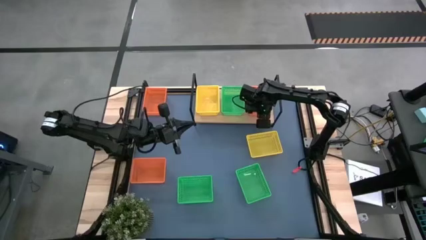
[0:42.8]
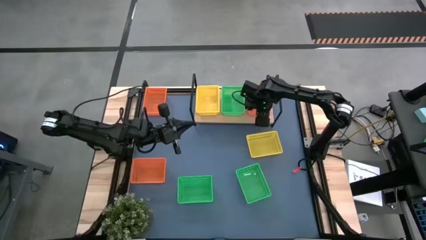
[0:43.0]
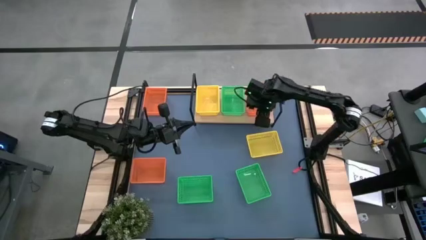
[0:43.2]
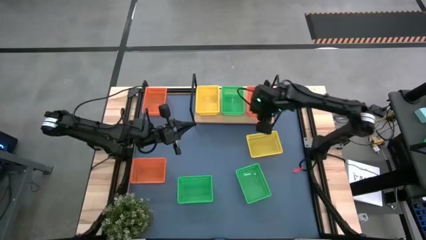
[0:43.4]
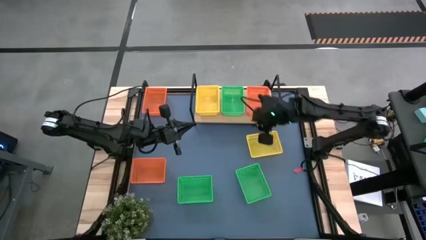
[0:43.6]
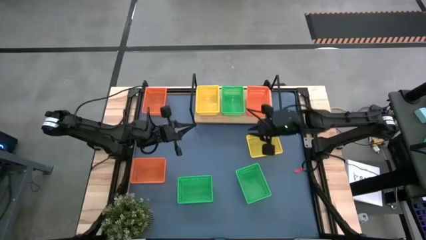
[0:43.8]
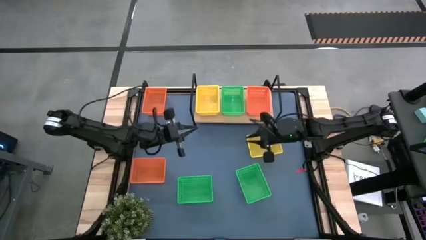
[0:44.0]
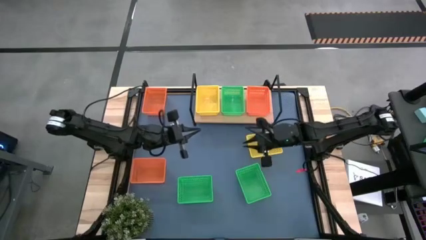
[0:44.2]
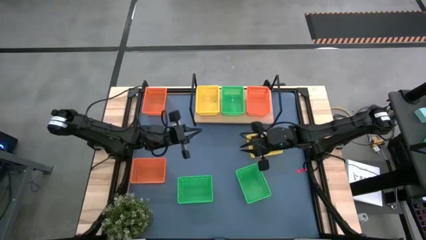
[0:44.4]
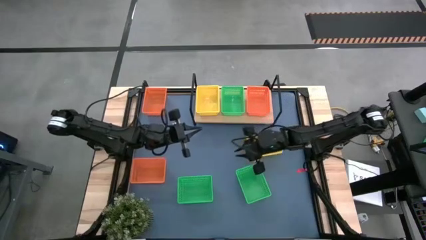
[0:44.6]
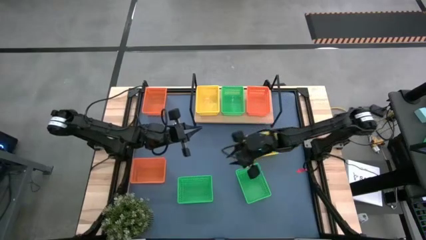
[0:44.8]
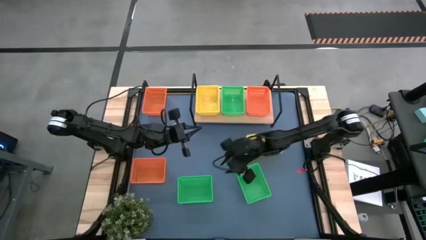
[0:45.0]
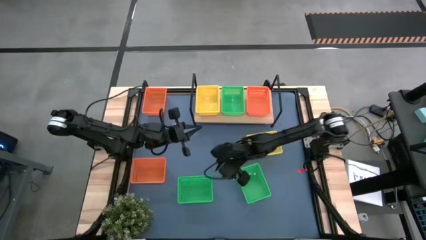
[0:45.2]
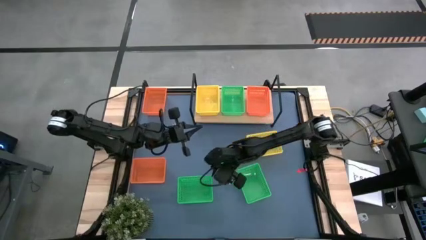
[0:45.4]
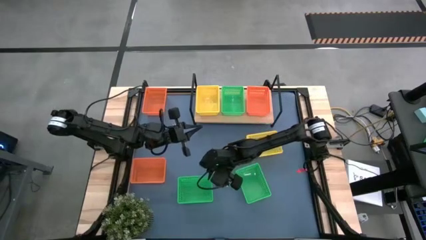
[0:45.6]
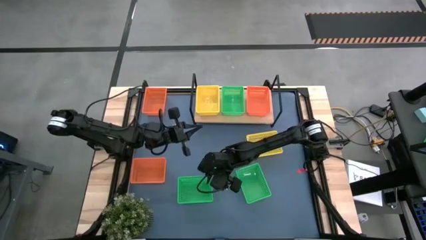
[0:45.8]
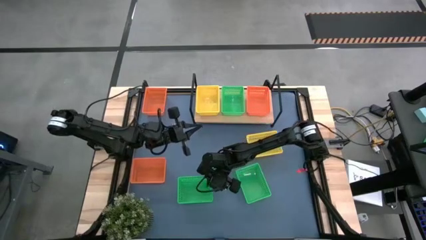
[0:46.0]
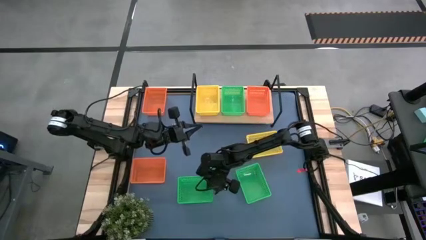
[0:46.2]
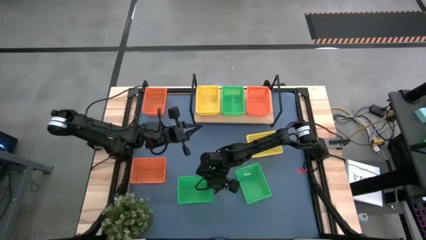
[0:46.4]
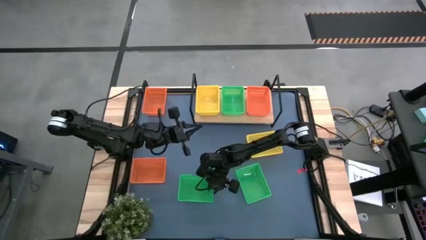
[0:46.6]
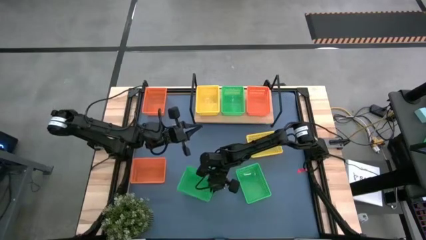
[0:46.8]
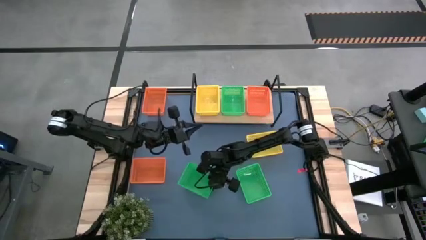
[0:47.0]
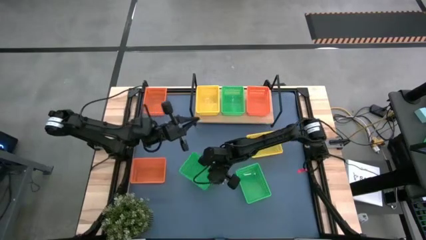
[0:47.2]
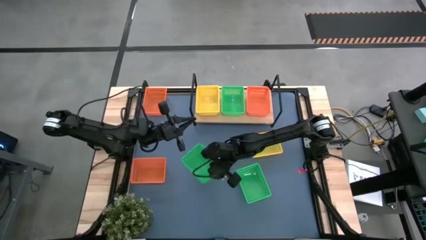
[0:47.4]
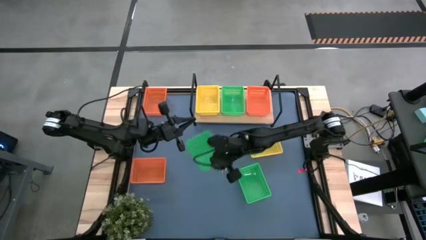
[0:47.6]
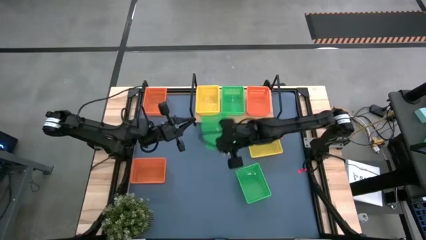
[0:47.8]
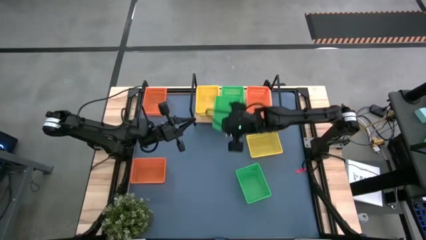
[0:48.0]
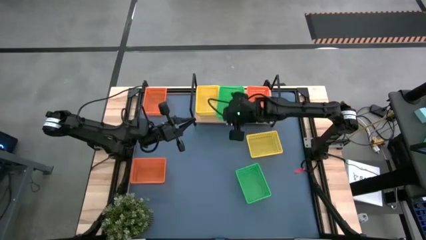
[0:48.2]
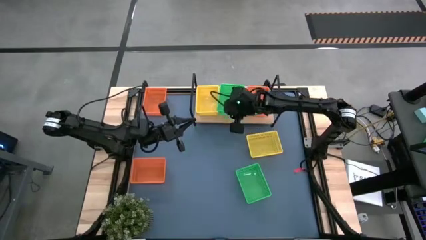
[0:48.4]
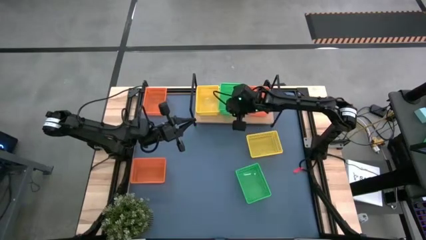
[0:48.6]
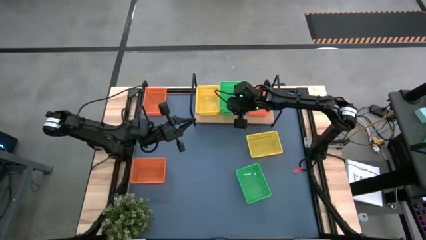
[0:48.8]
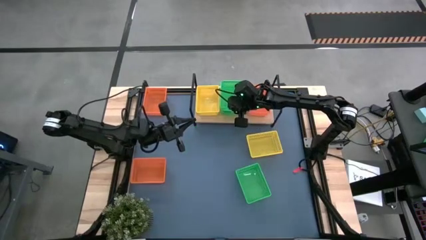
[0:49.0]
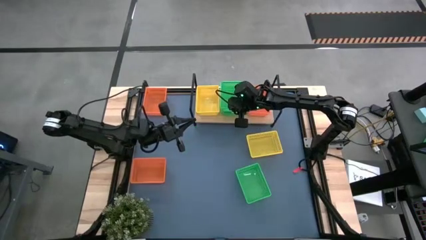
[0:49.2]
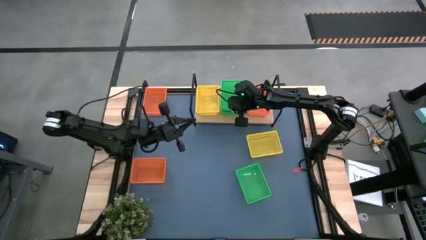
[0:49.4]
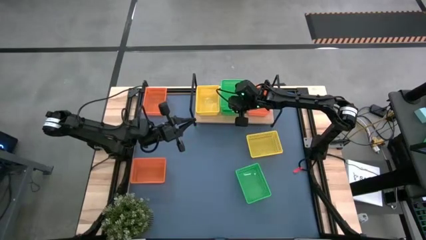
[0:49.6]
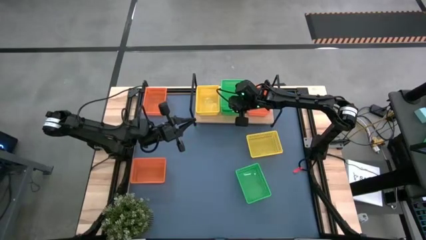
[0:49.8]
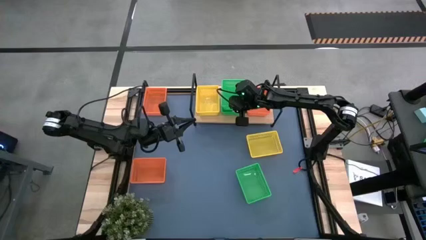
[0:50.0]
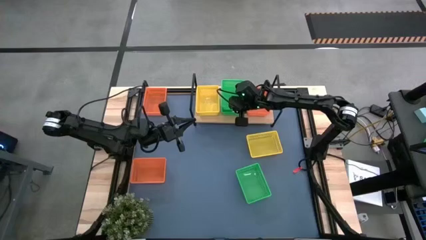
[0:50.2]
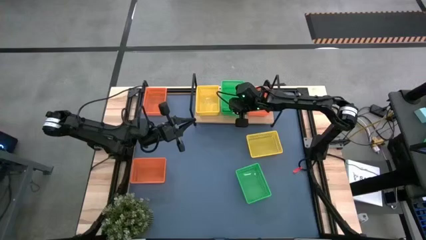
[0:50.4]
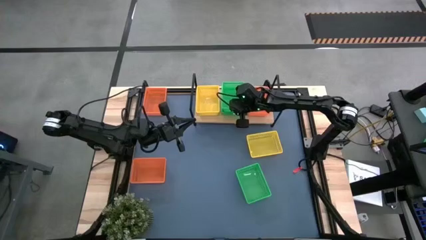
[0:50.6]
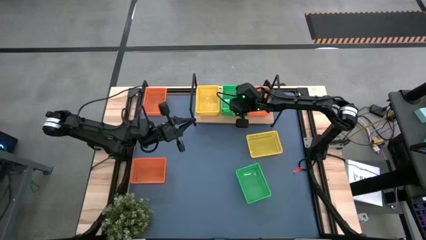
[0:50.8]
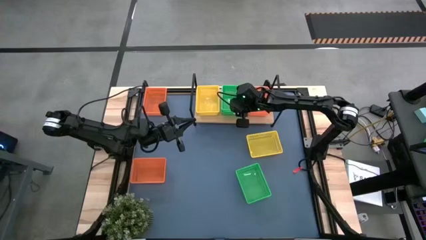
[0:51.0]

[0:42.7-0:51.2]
Task: Stack baskets on shelf by color
Stack the left green bin on top of the green bin on the shelf

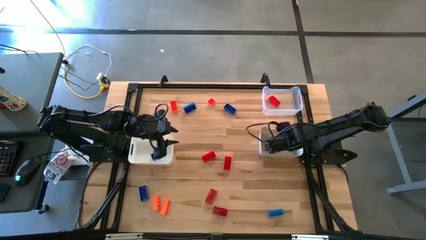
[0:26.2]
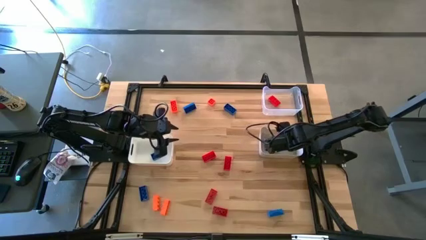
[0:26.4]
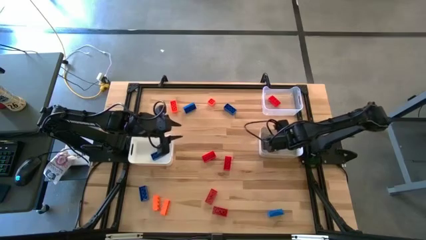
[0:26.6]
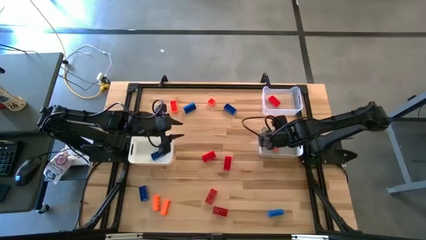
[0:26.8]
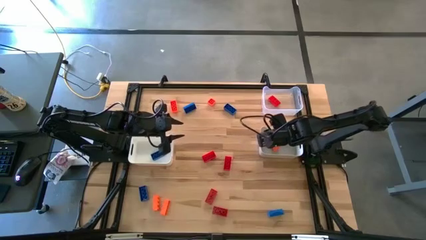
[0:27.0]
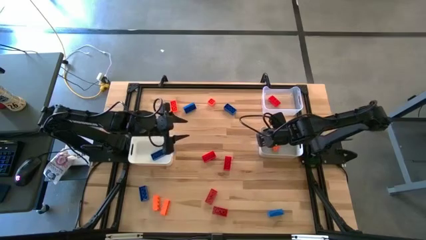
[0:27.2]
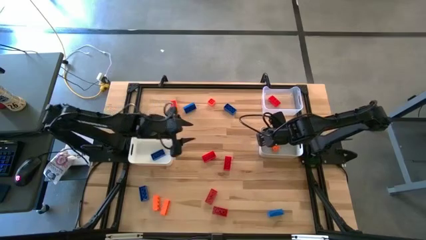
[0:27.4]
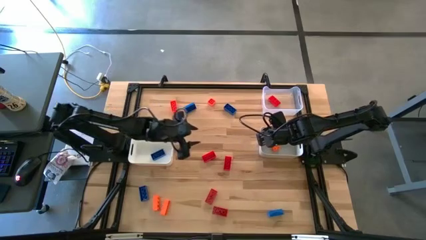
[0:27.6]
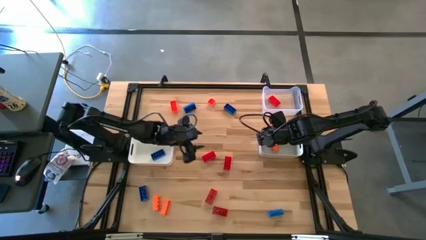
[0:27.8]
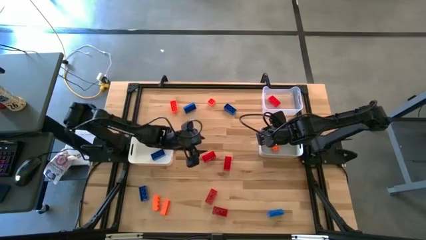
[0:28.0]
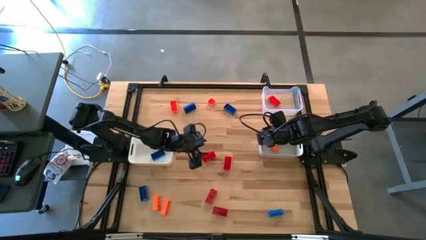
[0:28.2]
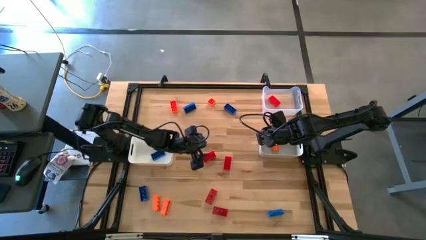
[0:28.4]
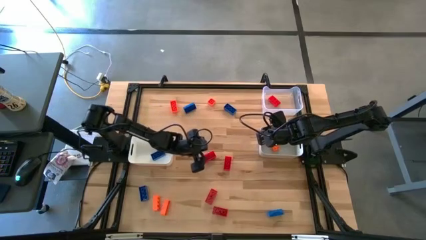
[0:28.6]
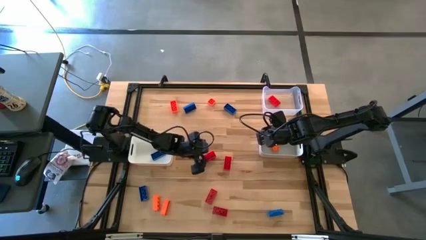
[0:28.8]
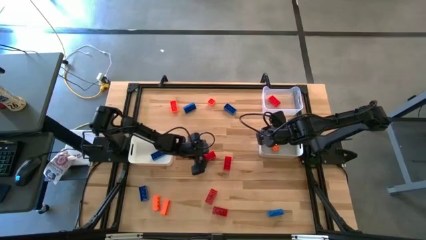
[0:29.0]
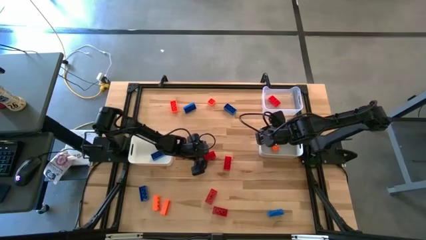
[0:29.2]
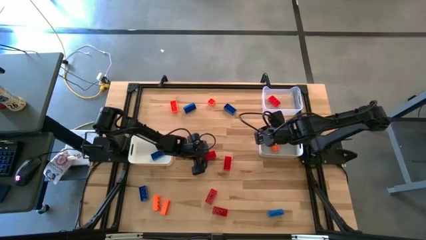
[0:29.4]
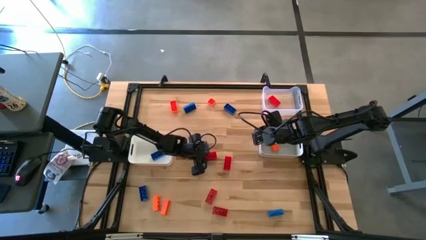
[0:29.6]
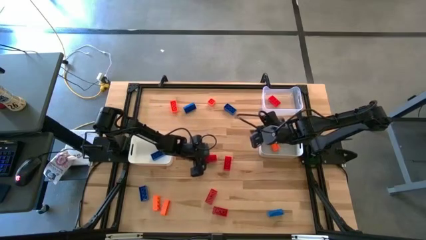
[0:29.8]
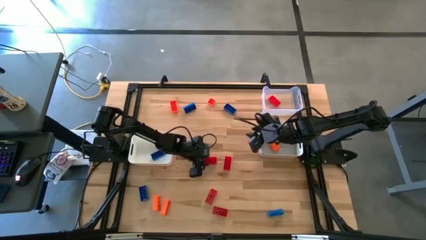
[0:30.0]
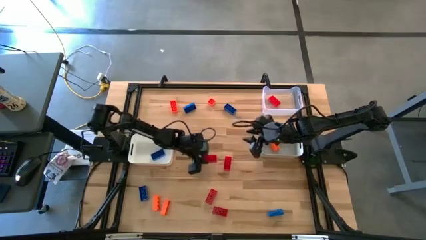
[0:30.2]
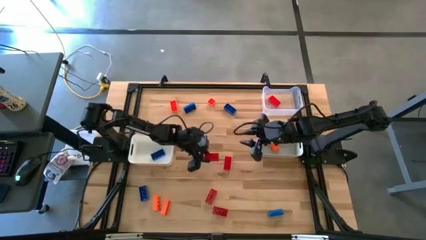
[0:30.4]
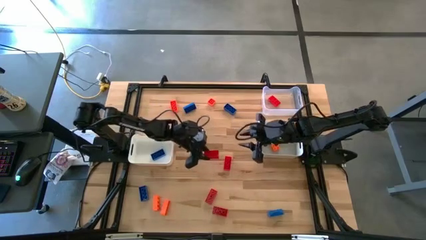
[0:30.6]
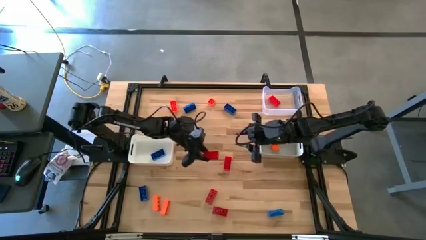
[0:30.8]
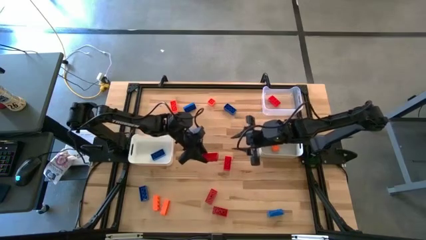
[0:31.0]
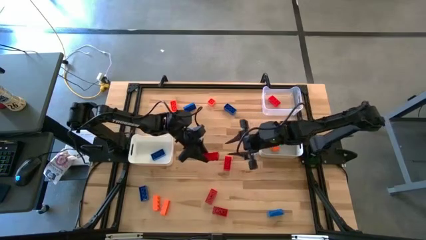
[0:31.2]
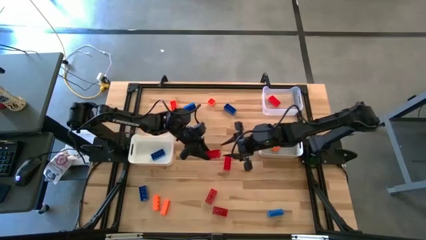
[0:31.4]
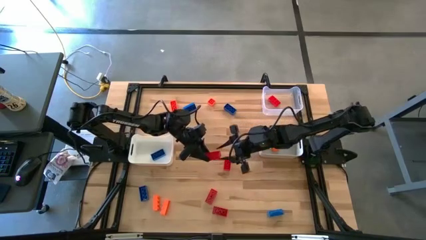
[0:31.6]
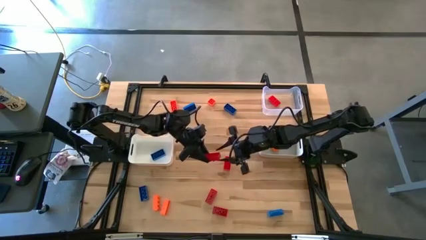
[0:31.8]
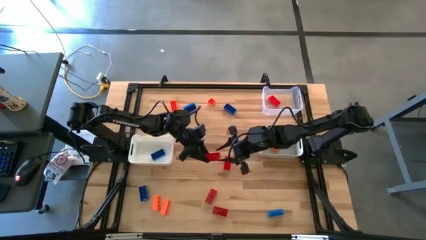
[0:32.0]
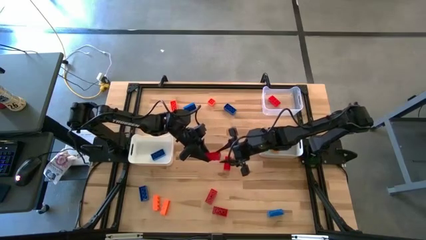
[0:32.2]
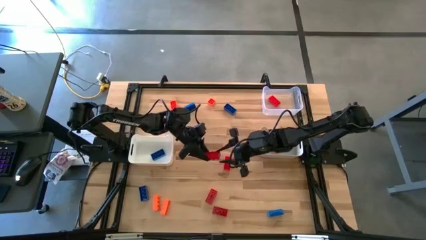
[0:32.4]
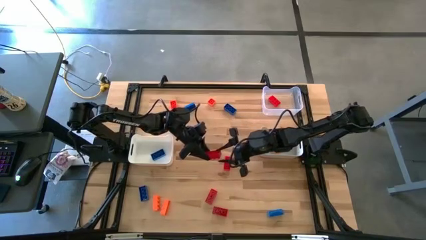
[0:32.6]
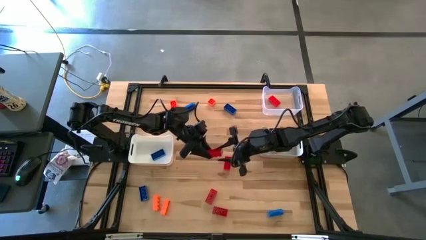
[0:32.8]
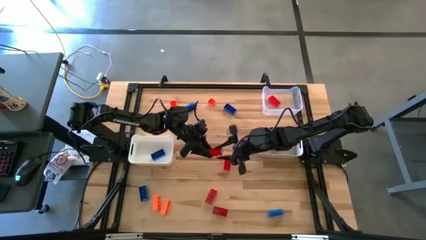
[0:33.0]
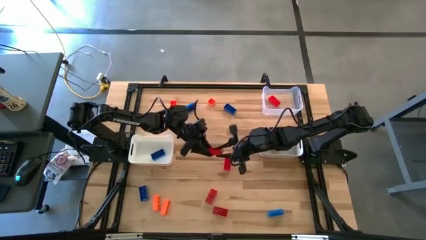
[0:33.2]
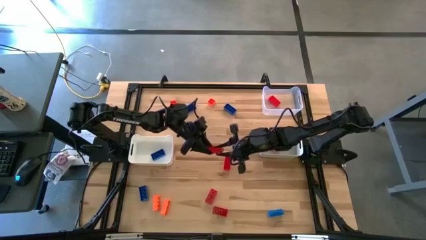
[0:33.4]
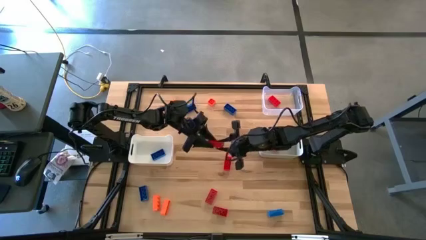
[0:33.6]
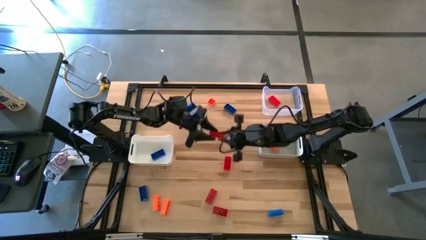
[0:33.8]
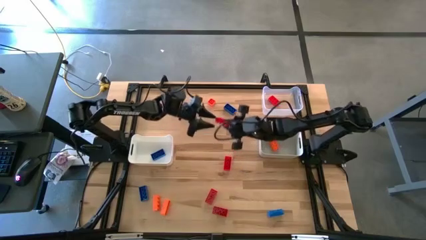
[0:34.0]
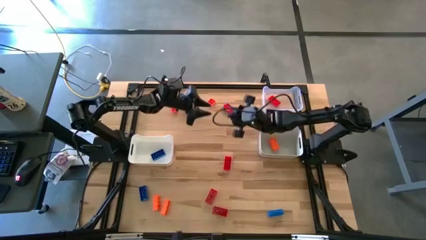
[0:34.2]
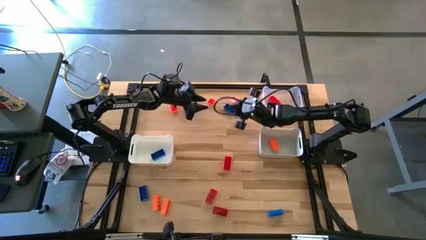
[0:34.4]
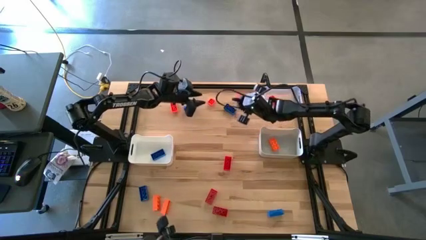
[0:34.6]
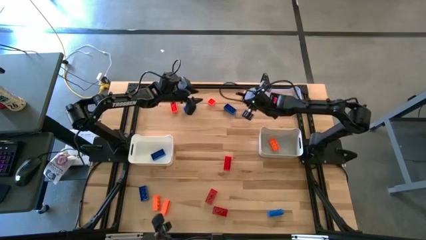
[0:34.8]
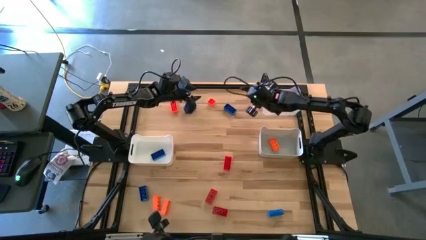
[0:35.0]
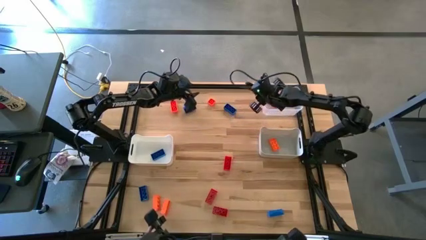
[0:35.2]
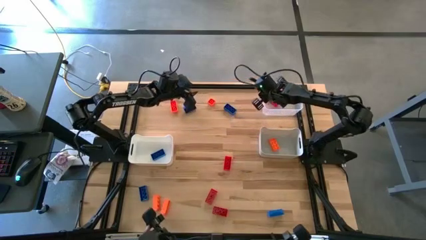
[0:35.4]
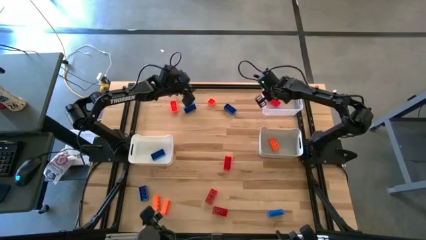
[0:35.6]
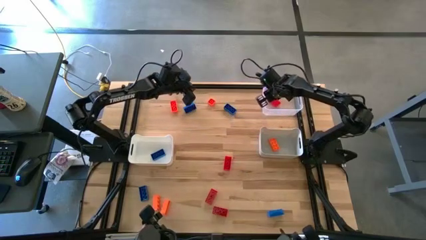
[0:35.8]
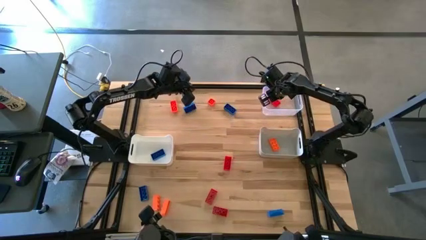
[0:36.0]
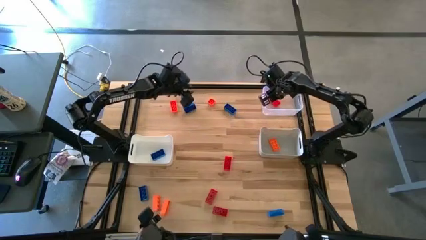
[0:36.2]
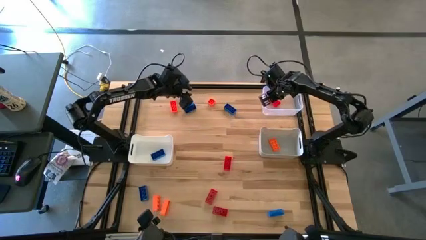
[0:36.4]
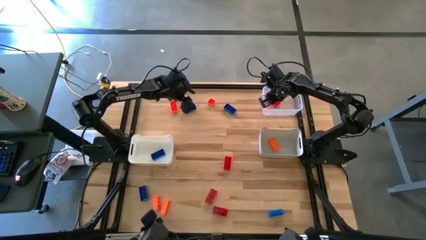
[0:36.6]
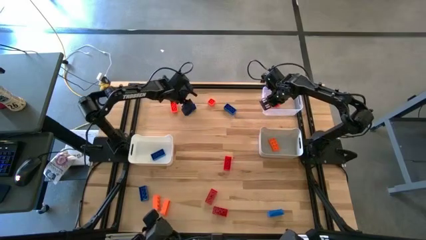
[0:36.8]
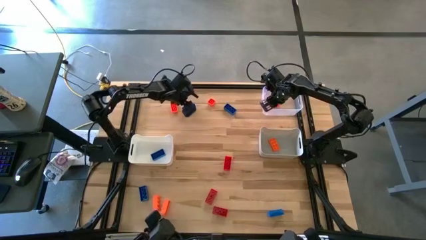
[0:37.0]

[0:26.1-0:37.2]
Task: Sort & place blocks by color
Put the red game piece into the transparent bin
